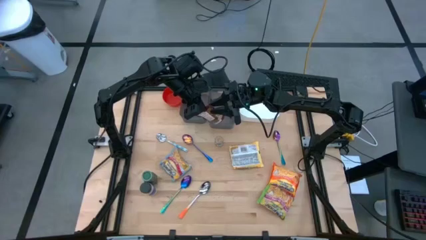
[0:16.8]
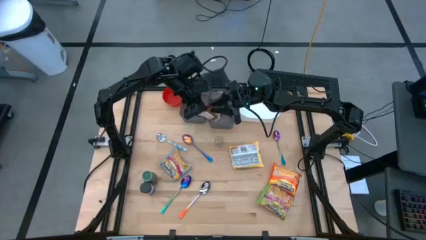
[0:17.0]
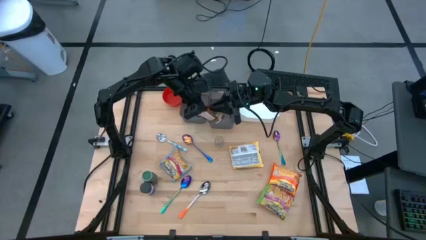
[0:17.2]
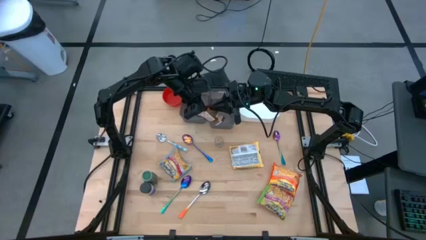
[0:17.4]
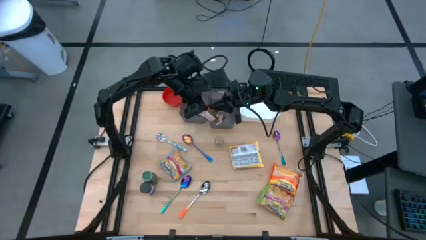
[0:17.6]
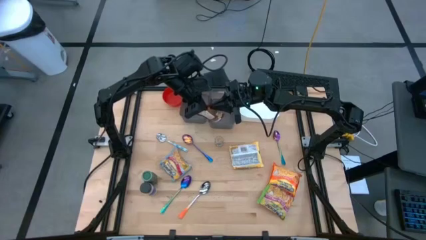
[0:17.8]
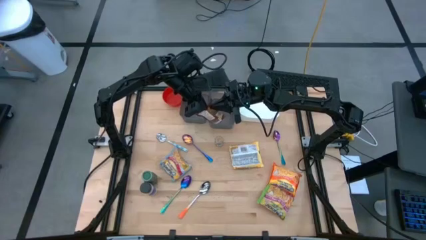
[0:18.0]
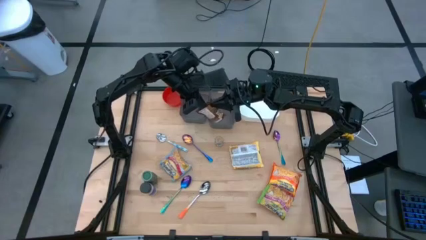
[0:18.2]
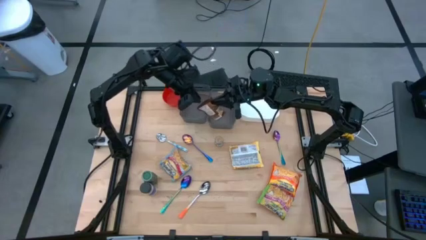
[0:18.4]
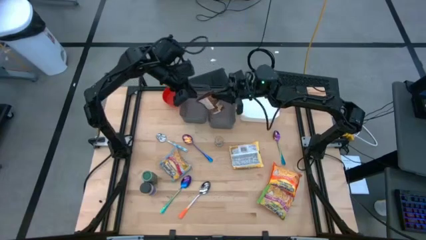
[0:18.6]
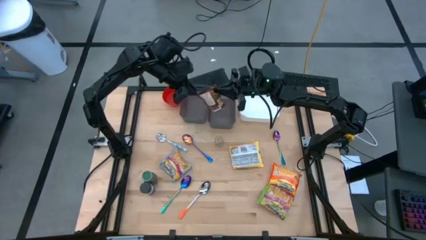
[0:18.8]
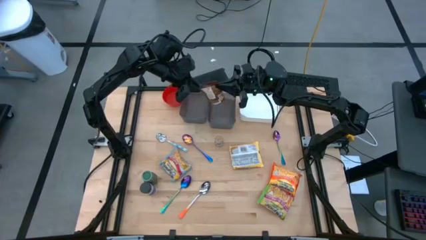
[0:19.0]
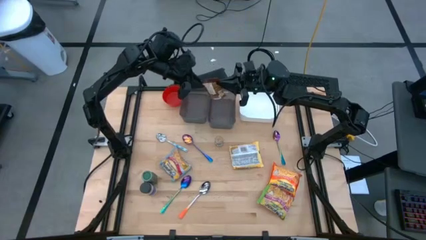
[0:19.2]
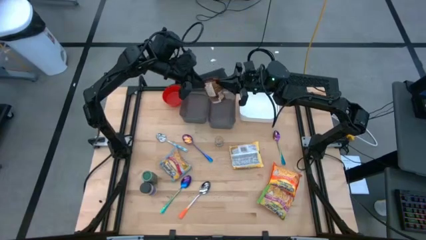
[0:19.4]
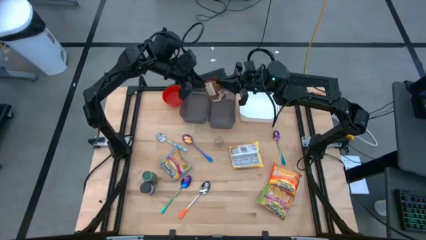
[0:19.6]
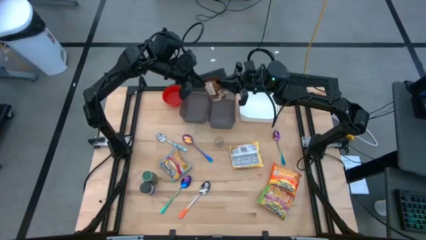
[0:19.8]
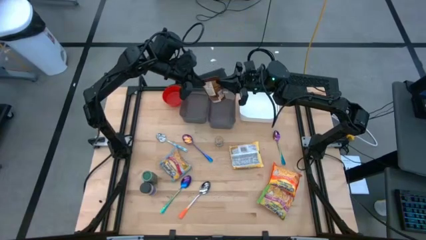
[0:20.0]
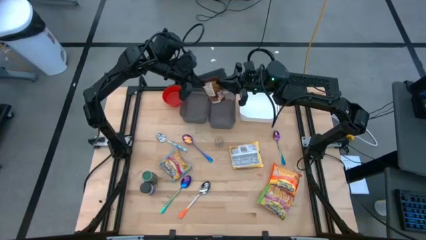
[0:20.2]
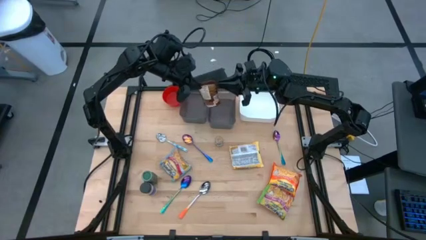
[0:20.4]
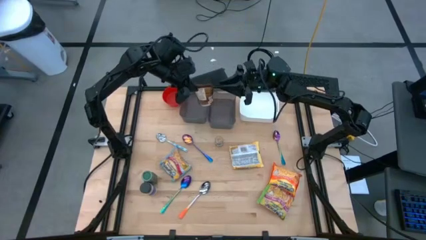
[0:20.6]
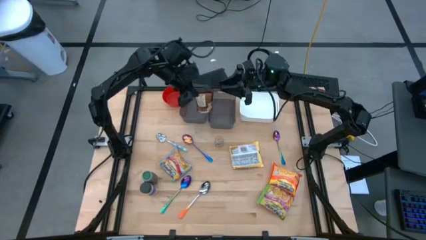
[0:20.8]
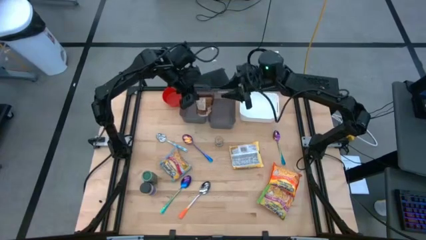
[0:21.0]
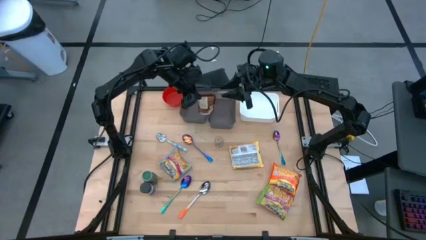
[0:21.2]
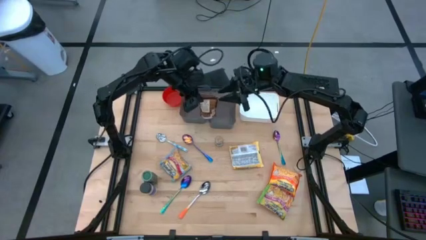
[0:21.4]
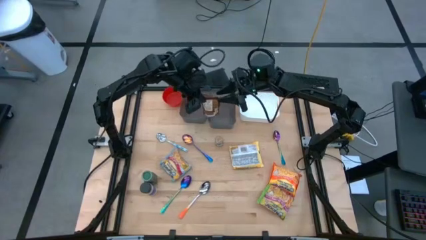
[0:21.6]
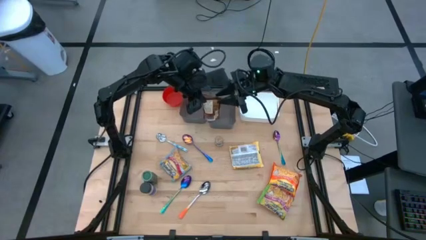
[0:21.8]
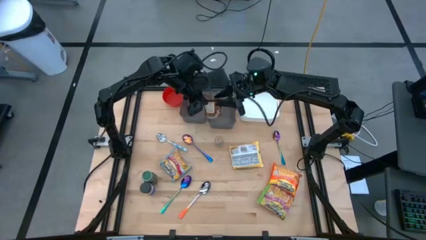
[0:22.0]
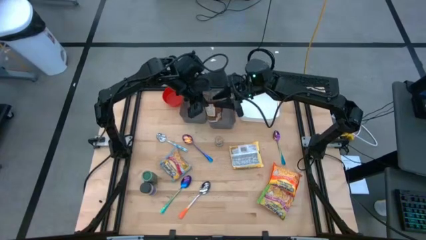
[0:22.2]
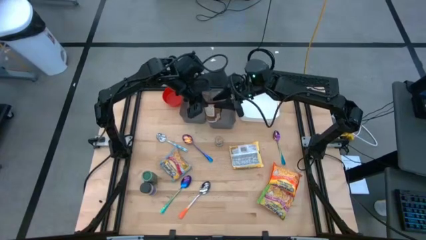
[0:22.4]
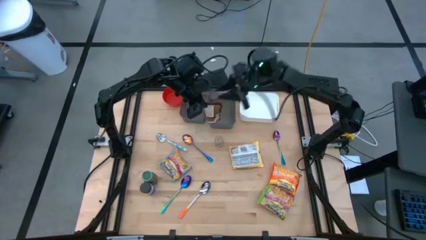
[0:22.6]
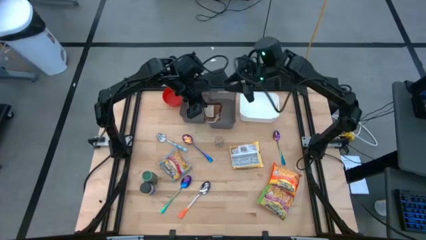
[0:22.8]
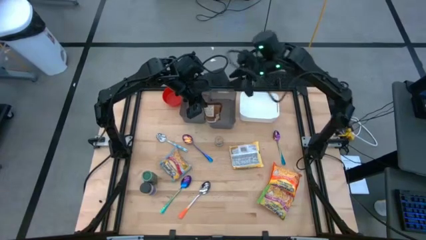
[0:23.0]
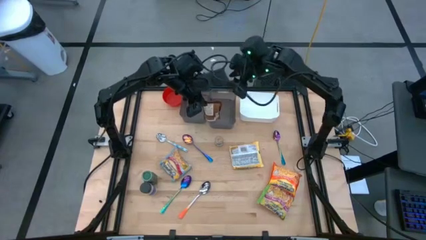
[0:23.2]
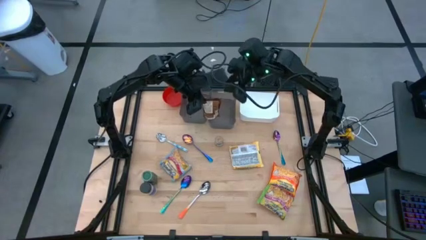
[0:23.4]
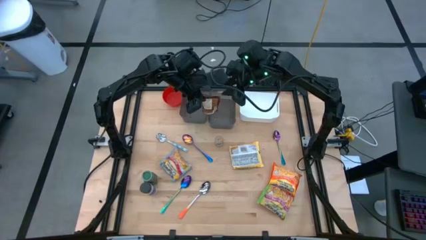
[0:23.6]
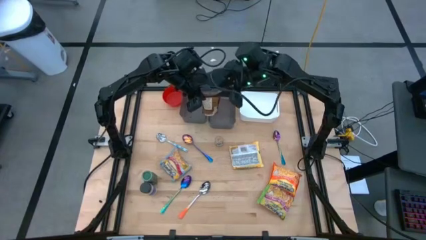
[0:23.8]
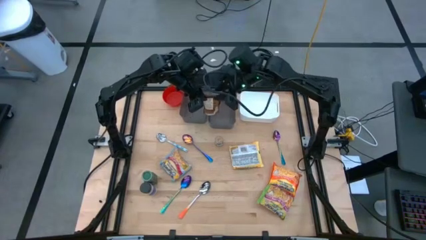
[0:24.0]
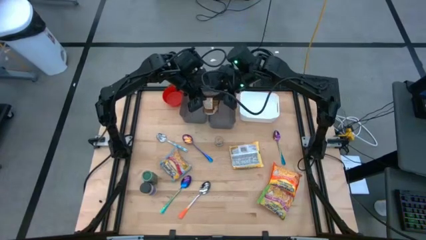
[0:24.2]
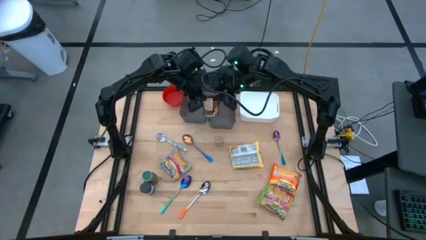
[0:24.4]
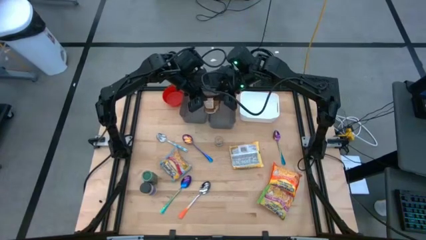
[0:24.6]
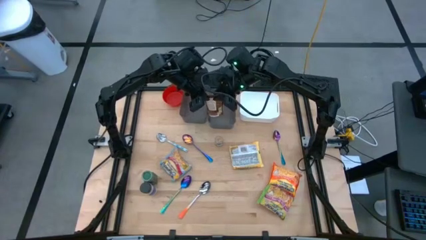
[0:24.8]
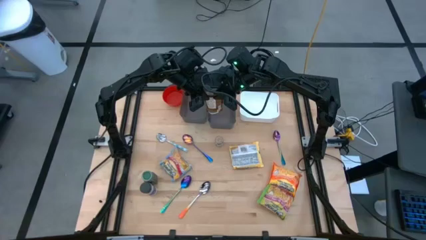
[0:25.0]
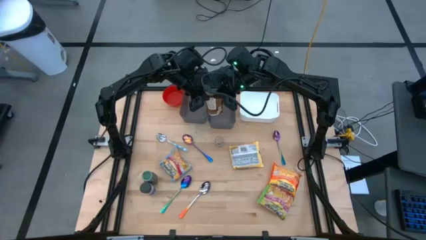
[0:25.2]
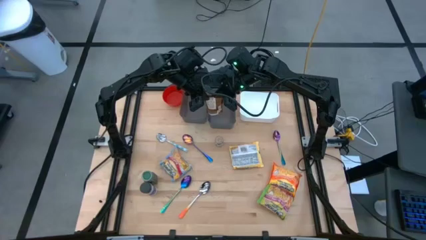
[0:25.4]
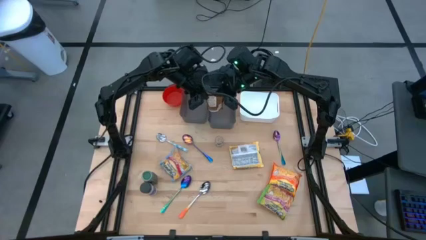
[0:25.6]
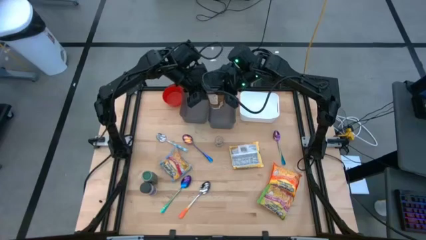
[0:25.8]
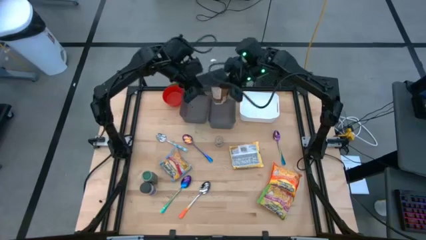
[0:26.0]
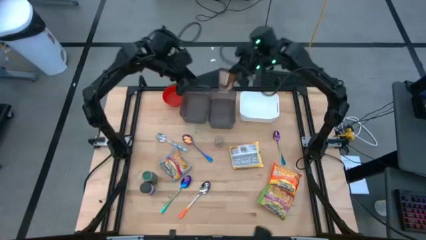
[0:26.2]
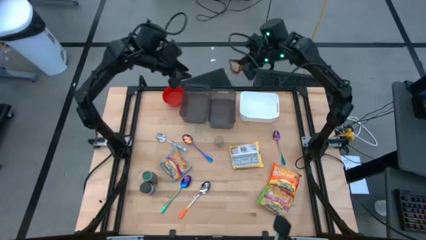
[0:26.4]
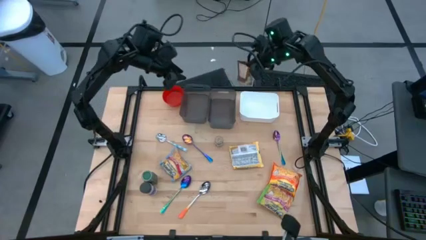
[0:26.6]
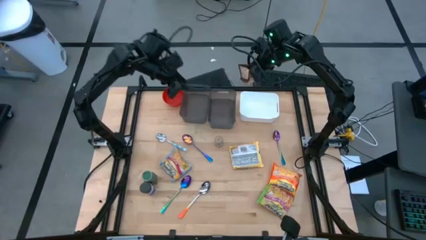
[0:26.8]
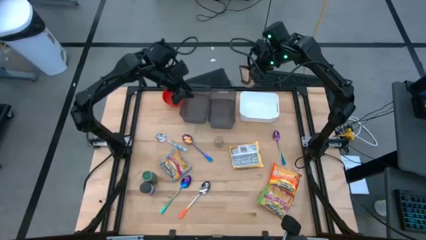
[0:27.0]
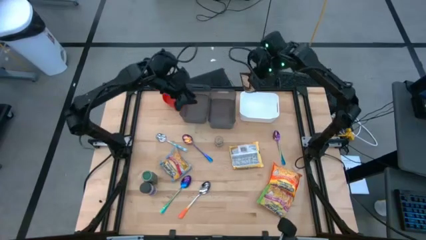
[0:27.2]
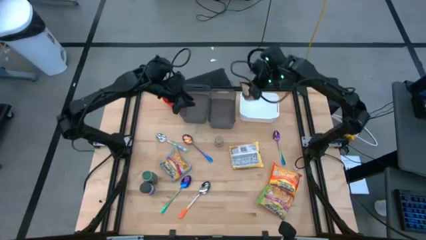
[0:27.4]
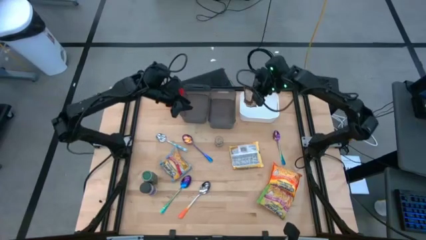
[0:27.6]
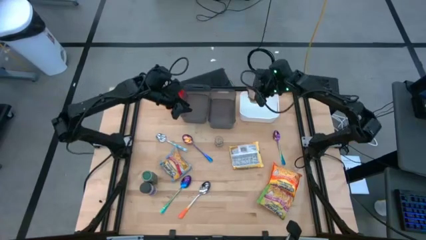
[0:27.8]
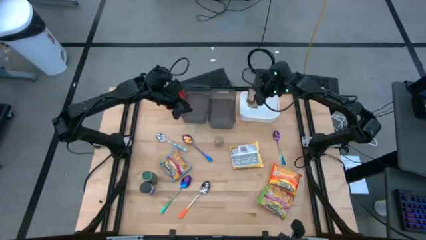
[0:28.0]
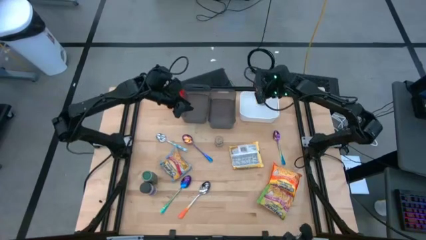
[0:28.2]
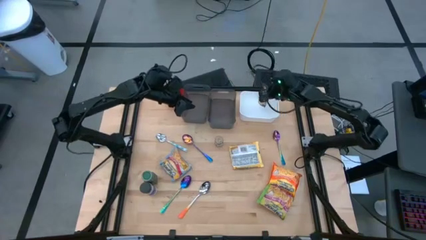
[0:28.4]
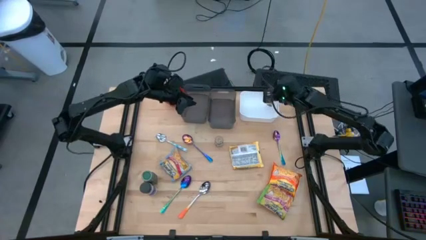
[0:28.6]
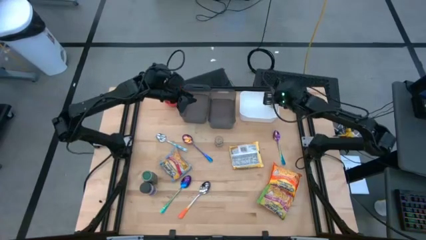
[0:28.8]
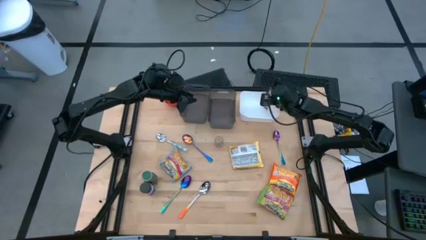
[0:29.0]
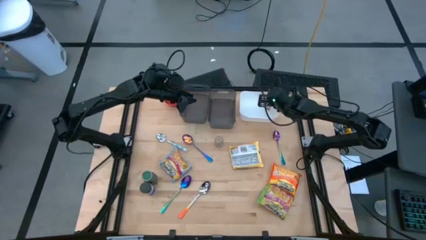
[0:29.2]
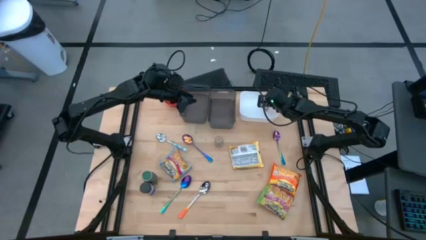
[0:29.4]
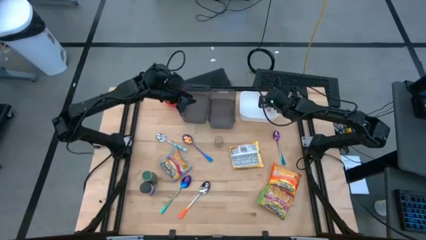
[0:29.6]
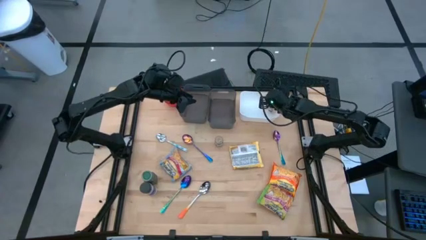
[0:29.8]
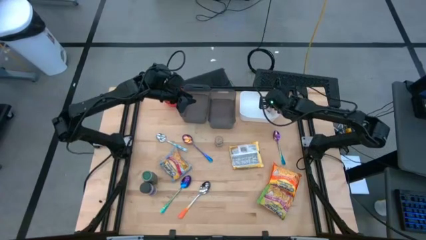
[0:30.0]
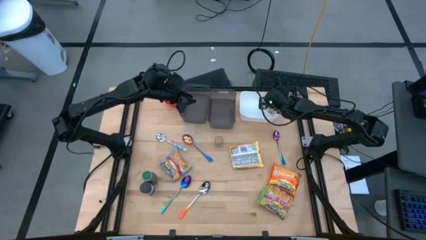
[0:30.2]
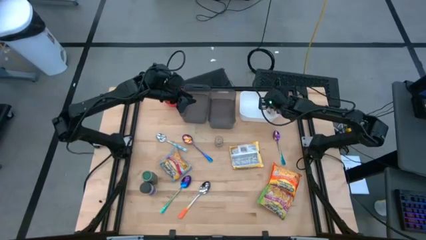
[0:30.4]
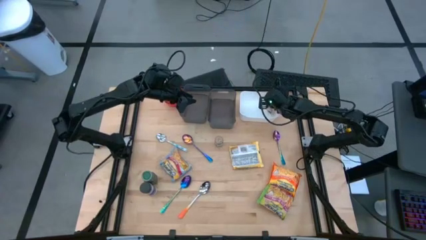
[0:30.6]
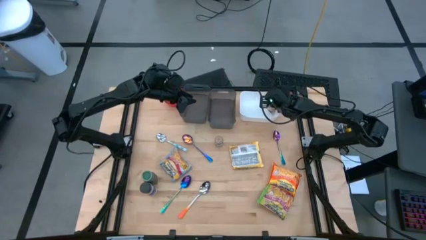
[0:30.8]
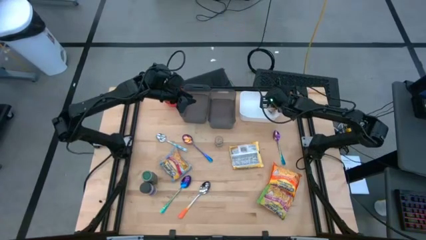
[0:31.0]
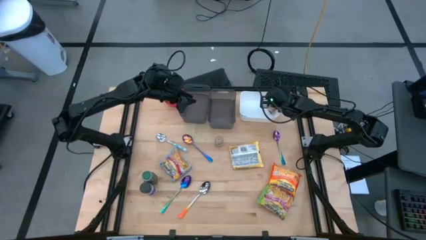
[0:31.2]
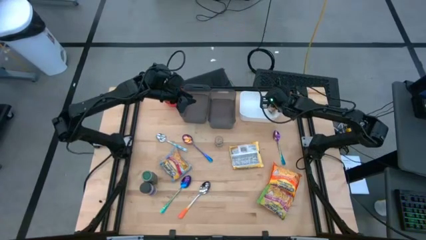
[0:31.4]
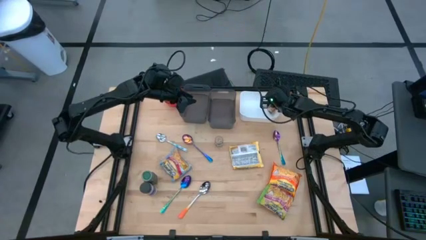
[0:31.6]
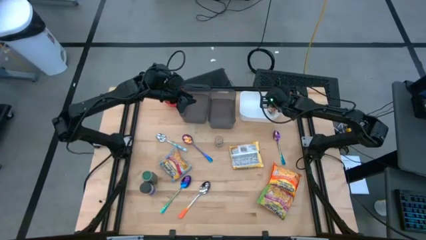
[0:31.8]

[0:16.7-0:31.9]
Task: Pick & Place Food Item
Put the orange seasoning pack into the white bin
